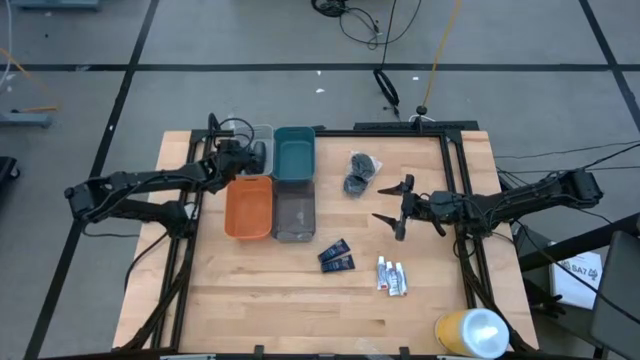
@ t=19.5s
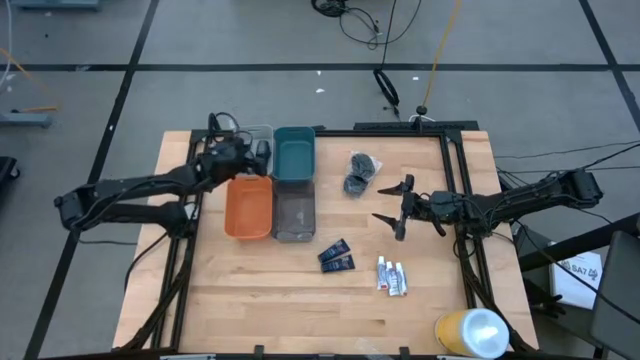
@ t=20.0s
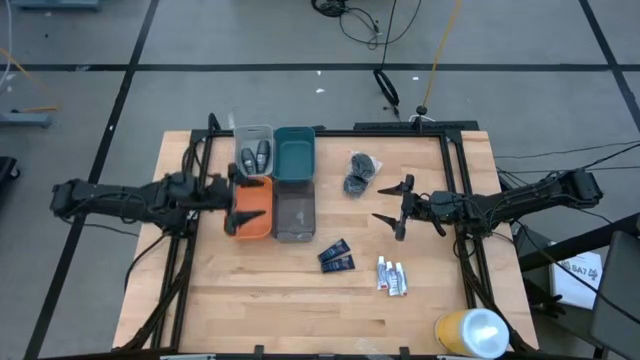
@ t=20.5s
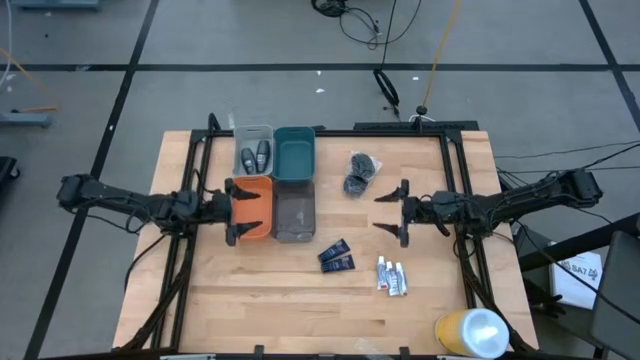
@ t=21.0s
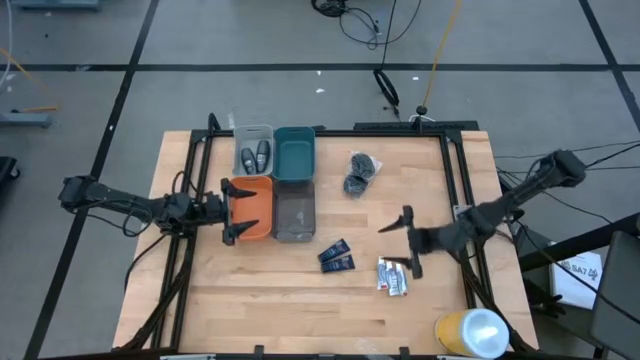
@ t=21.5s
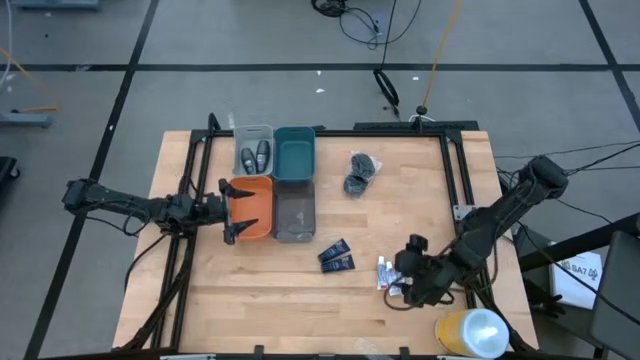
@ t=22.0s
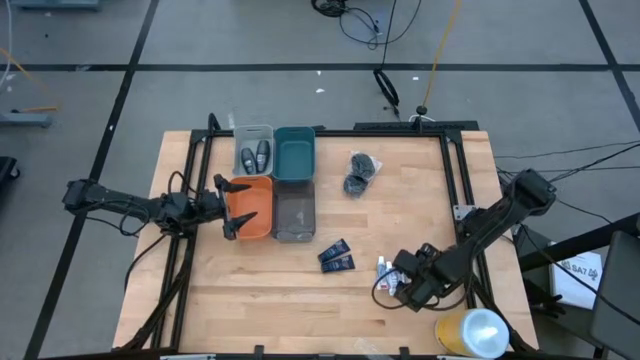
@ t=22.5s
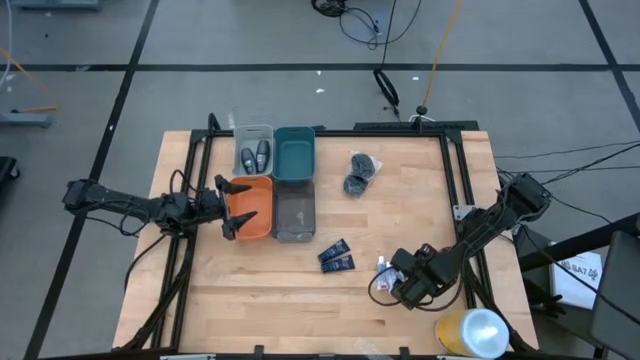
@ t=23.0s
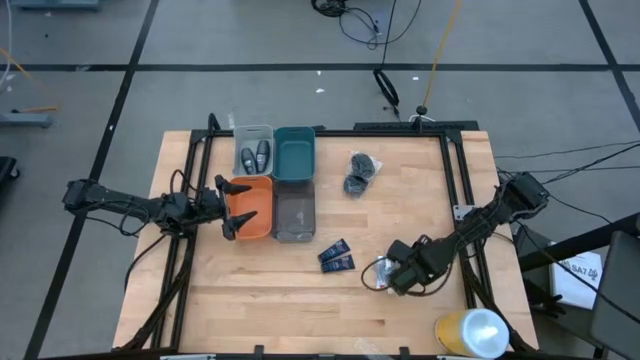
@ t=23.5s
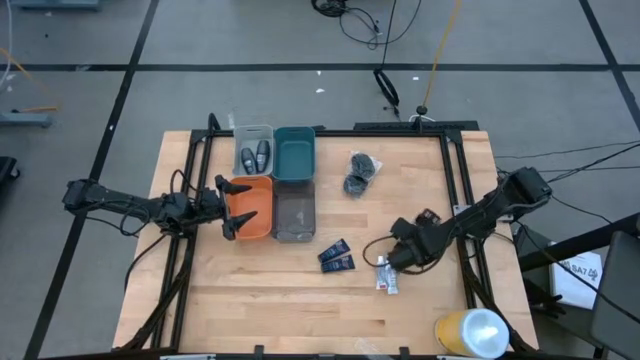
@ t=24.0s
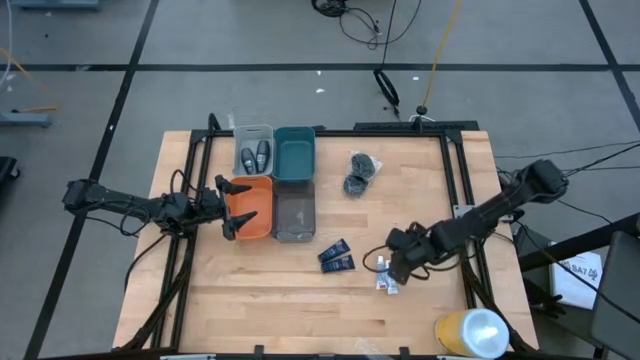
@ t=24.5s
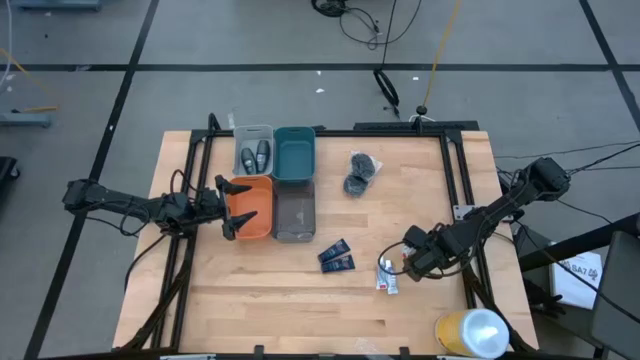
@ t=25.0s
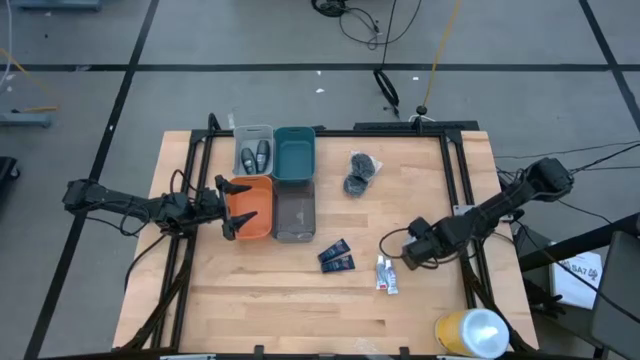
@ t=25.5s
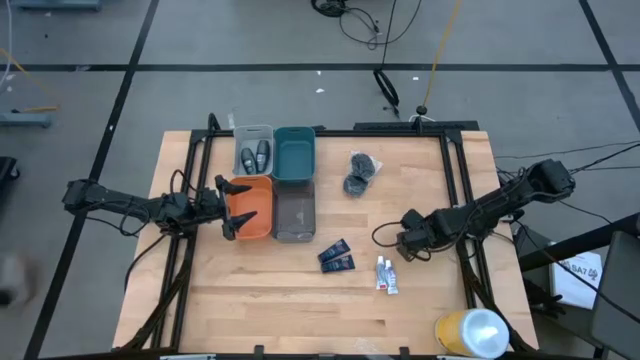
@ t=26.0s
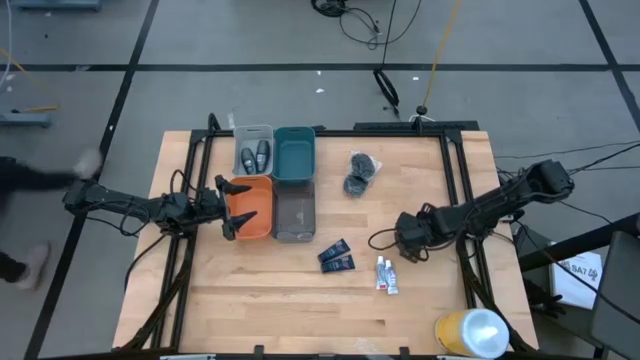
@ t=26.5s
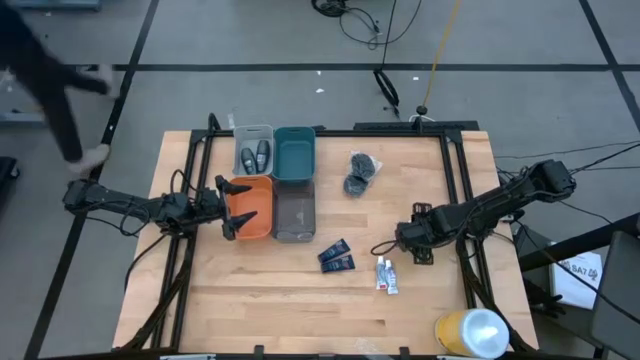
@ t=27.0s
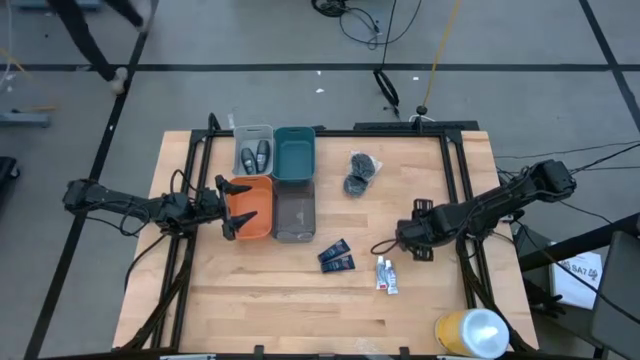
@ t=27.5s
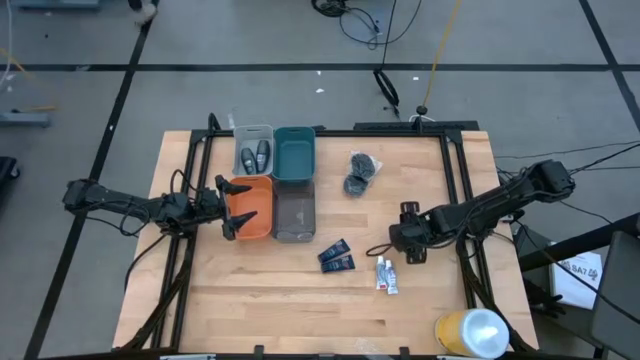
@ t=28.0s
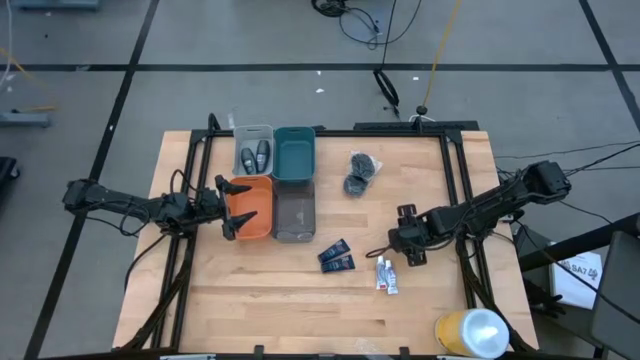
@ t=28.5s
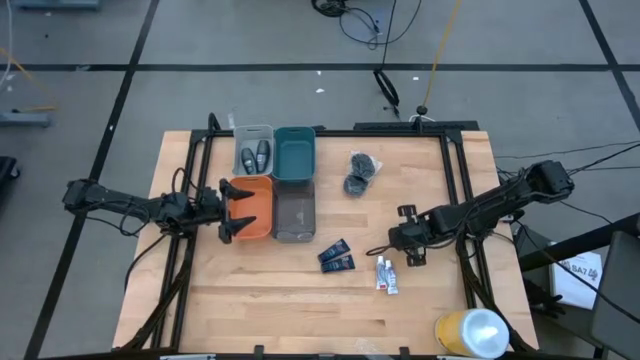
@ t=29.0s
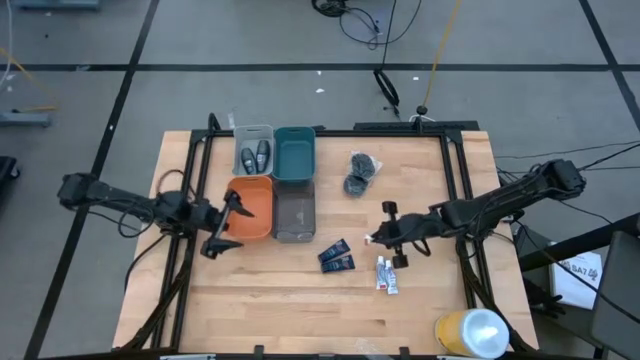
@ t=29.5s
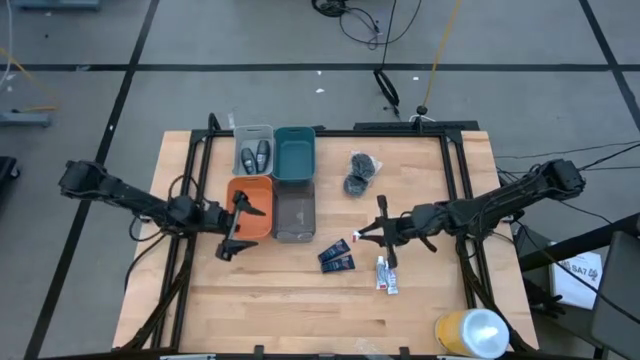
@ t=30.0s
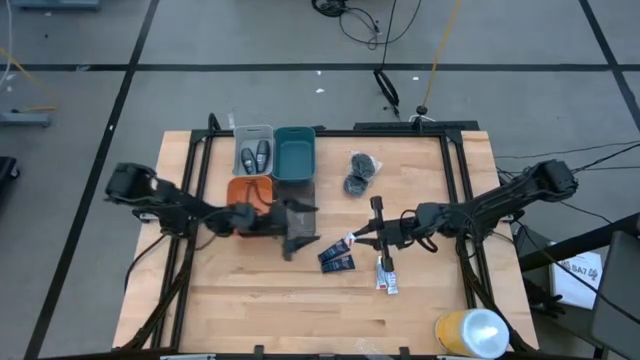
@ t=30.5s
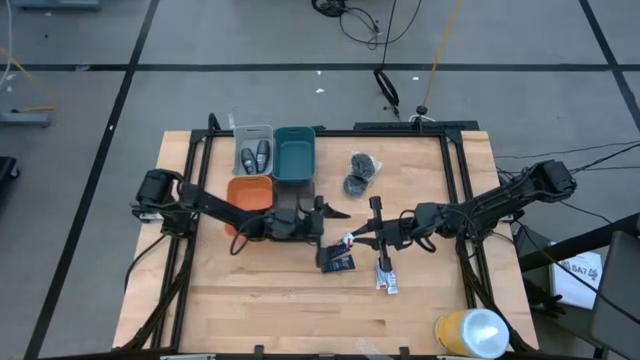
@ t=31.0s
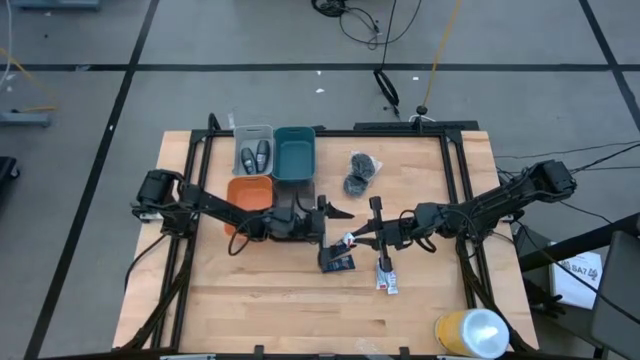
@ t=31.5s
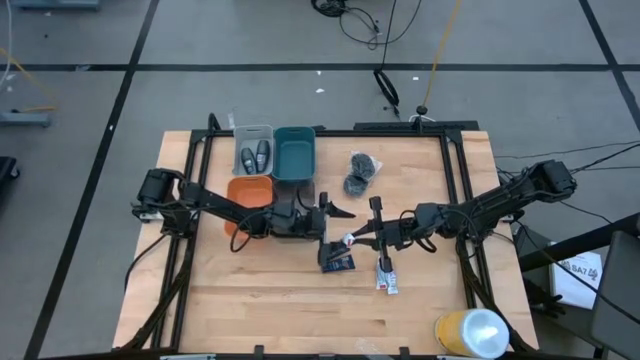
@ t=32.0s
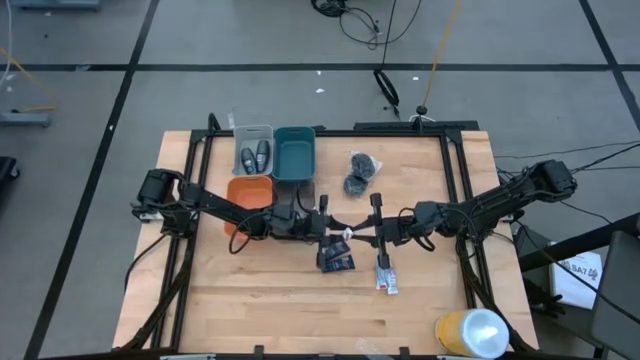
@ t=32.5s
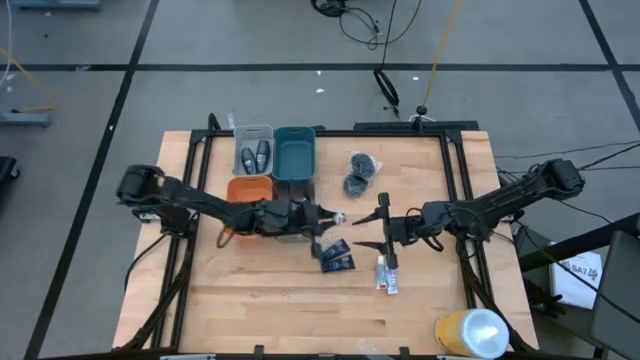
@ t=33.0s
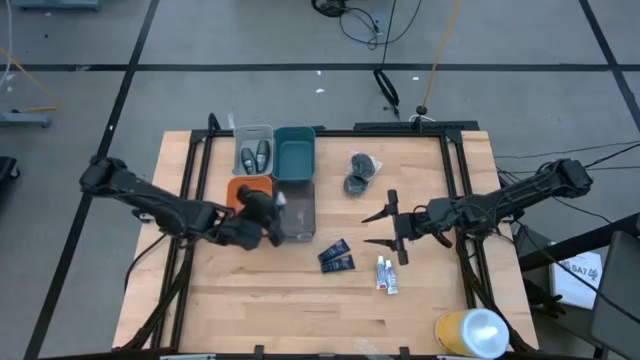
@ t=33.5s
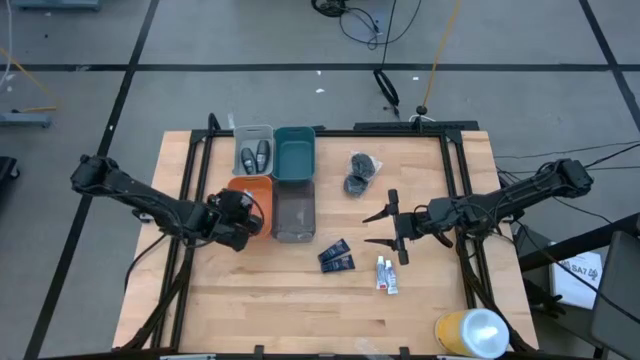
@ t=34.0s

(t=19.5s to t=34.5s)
Task: Pick & Place Travel size toiletries
Put the right white toothpaste into the orange bin

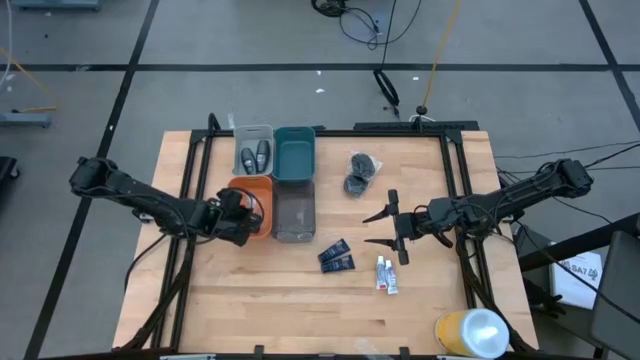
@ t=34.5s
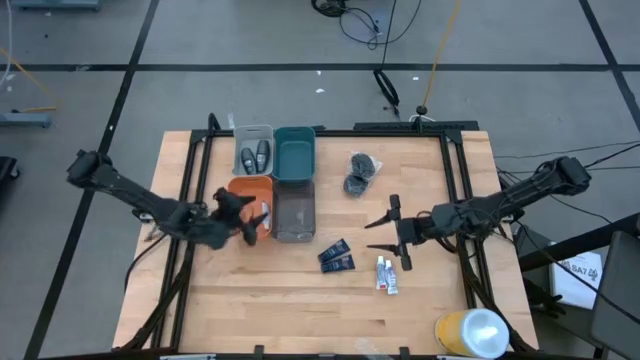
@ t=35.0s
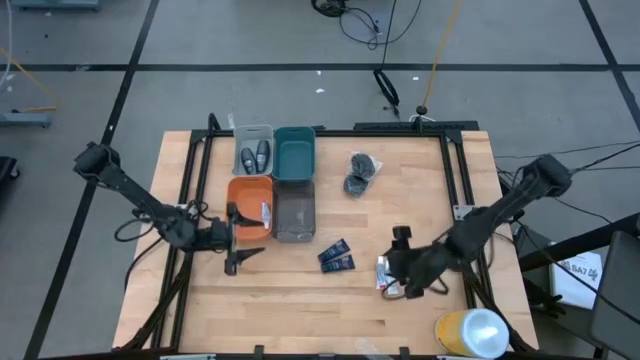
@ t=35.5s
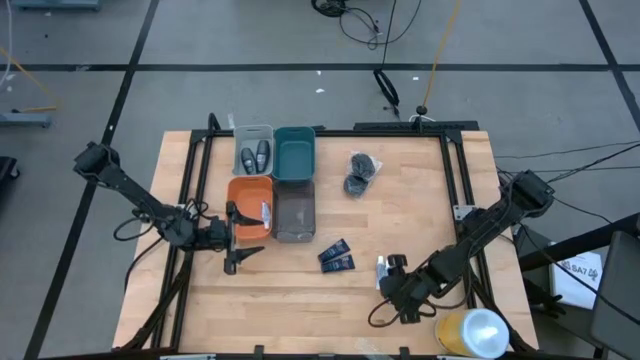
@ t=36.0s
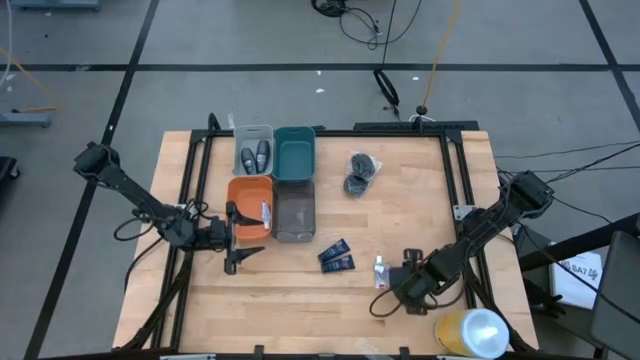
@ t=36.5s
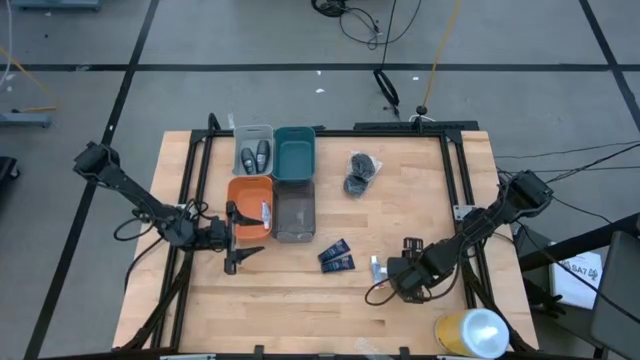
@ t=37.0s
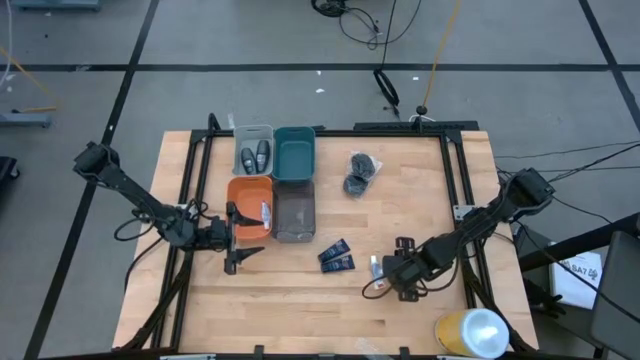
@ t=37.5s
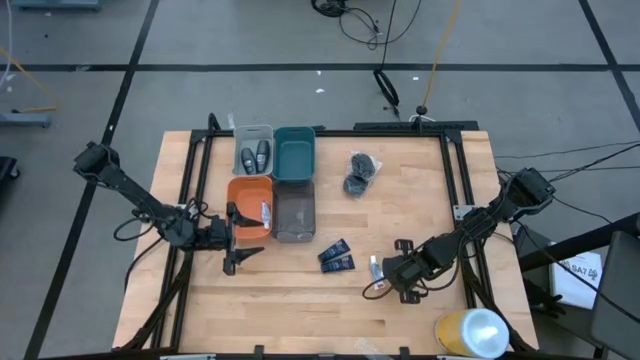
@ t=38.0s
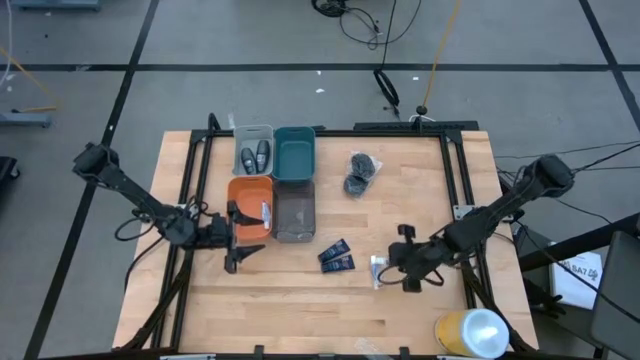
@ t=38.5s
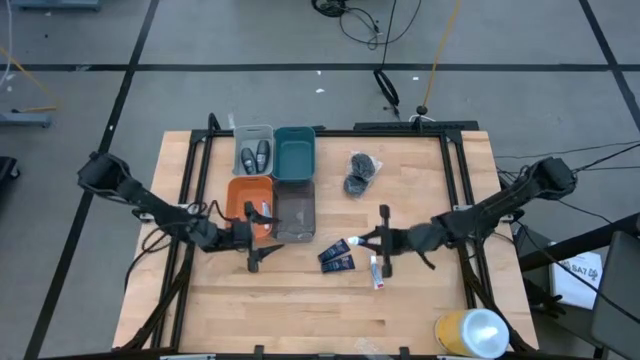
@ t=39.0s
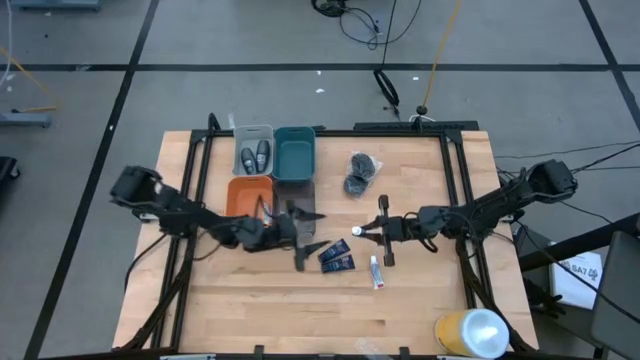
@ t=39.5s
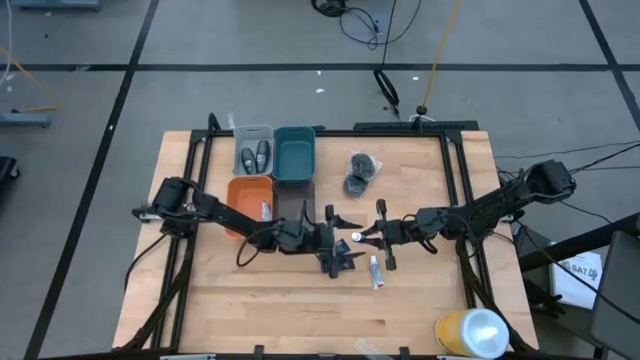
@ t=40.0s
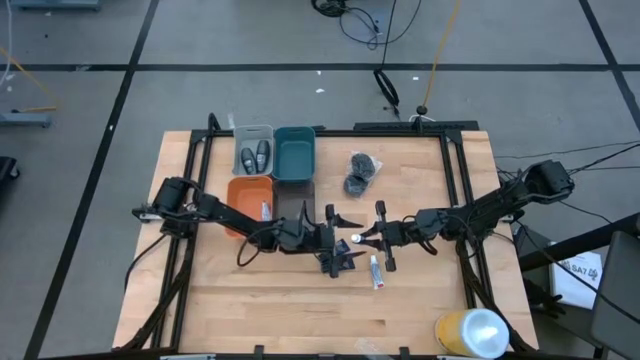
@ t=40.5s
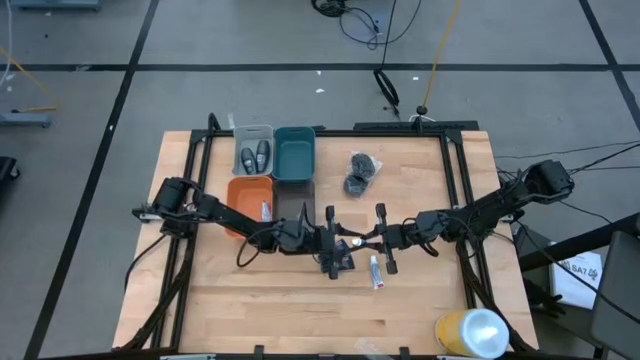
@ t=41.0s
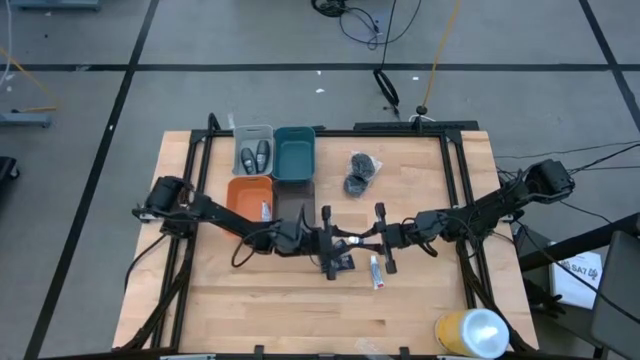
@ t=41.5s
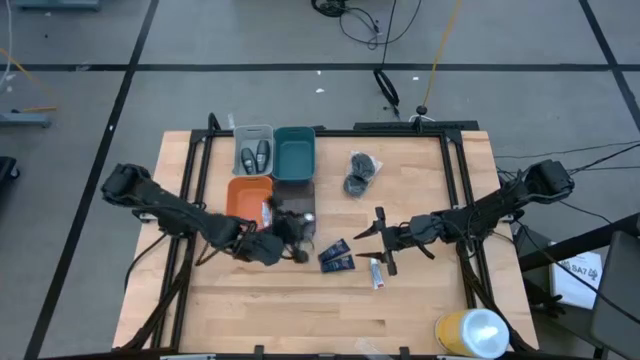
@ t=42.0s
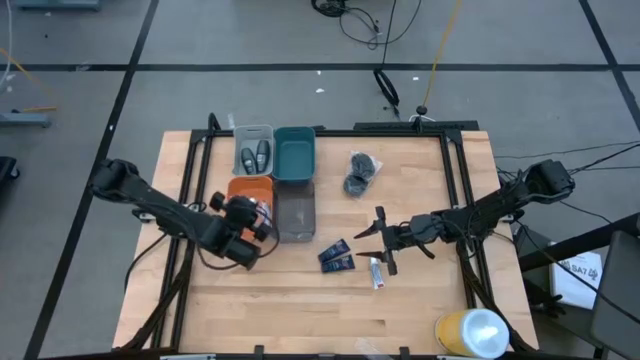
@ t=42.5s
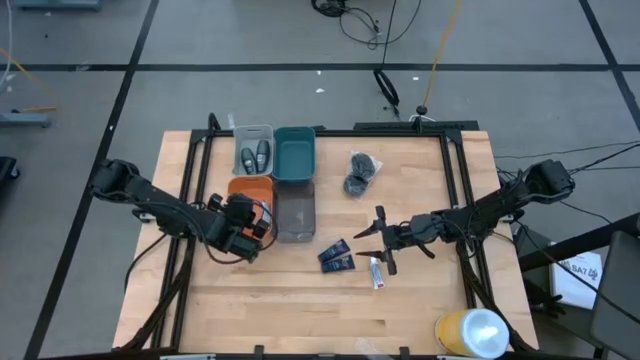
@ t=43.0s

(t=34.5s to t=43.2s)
Put the right white toothpaste into the orange bin
